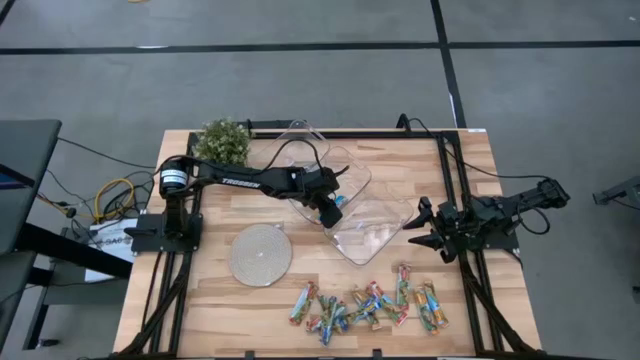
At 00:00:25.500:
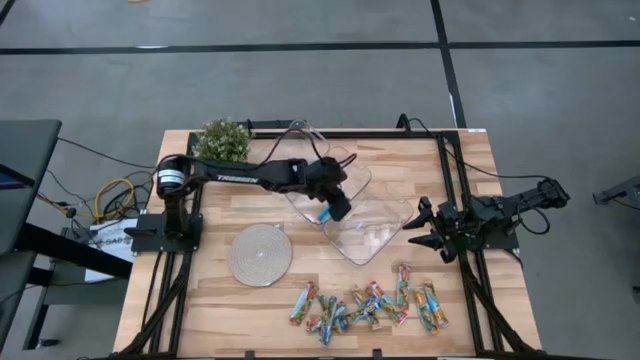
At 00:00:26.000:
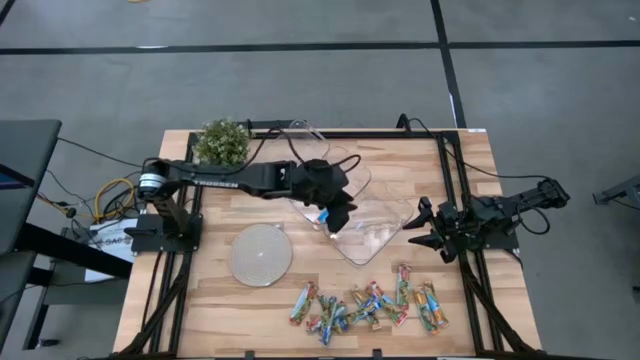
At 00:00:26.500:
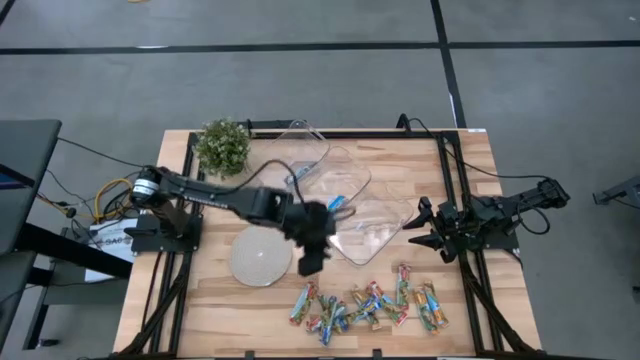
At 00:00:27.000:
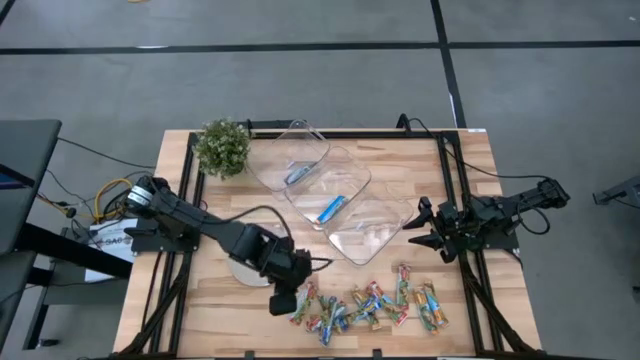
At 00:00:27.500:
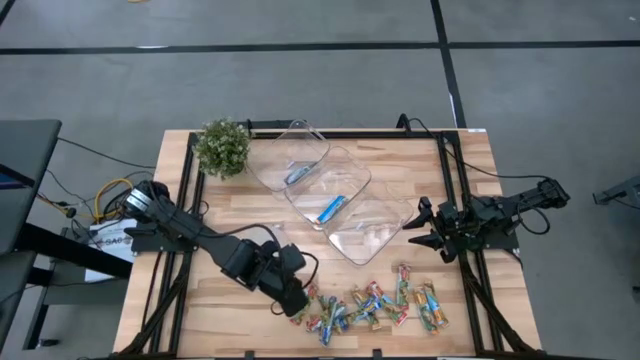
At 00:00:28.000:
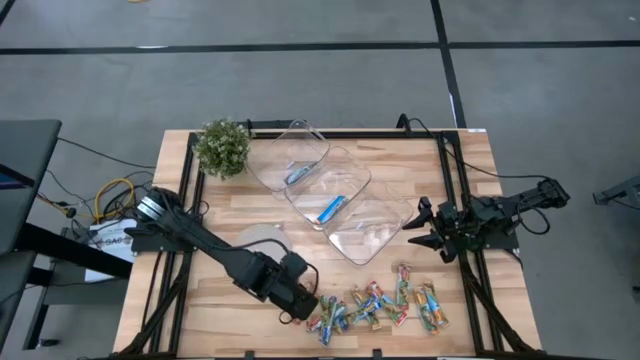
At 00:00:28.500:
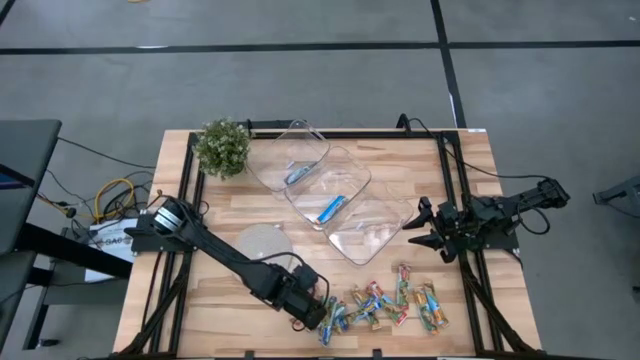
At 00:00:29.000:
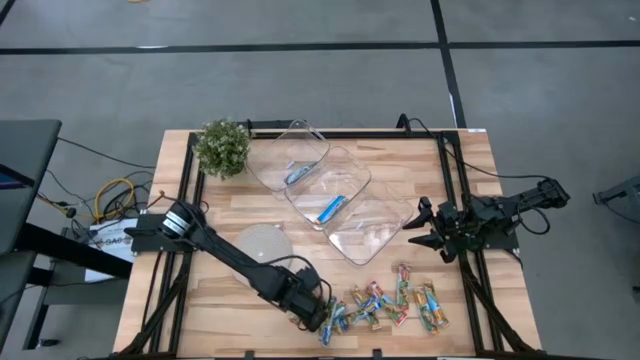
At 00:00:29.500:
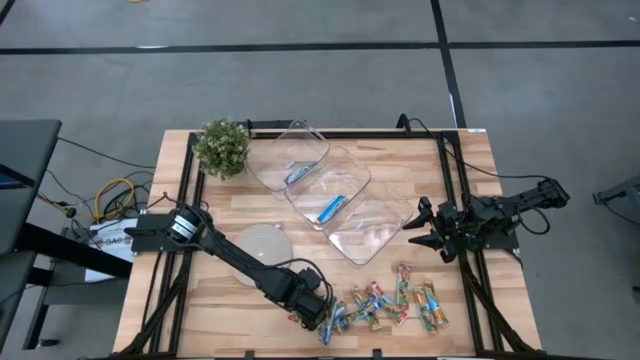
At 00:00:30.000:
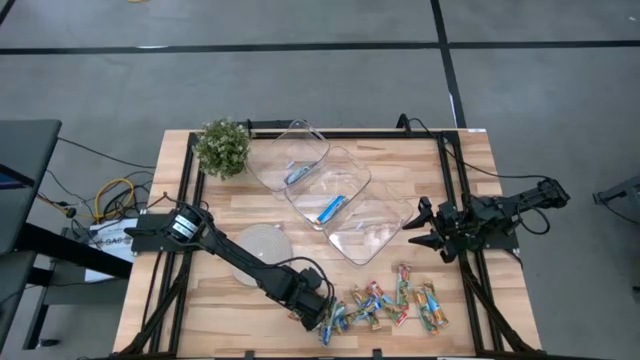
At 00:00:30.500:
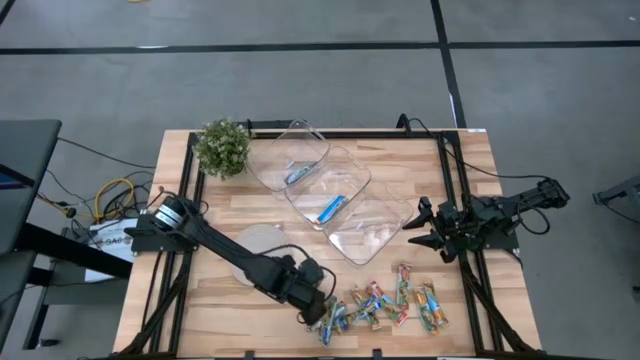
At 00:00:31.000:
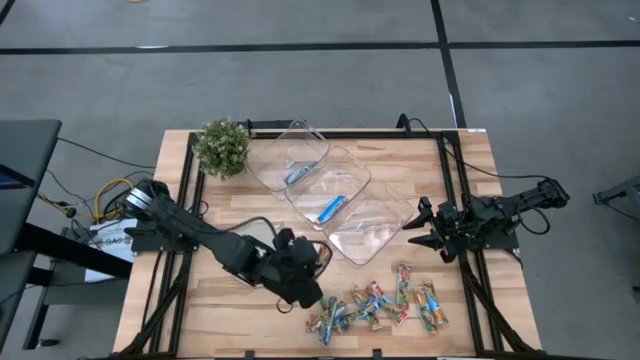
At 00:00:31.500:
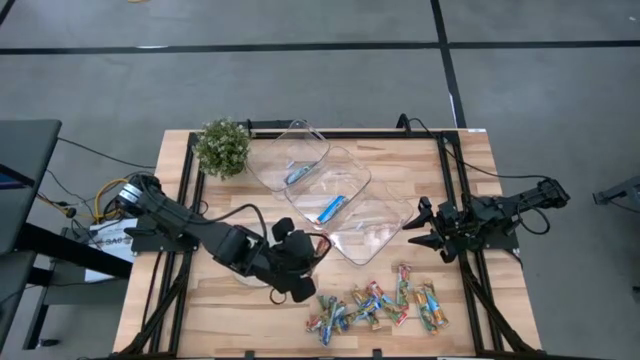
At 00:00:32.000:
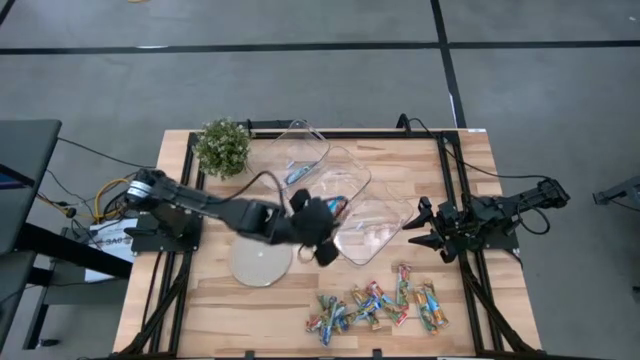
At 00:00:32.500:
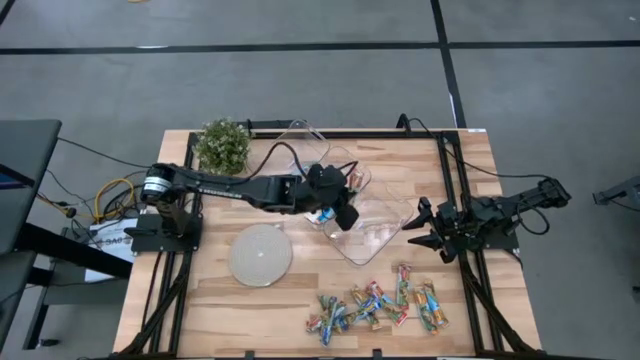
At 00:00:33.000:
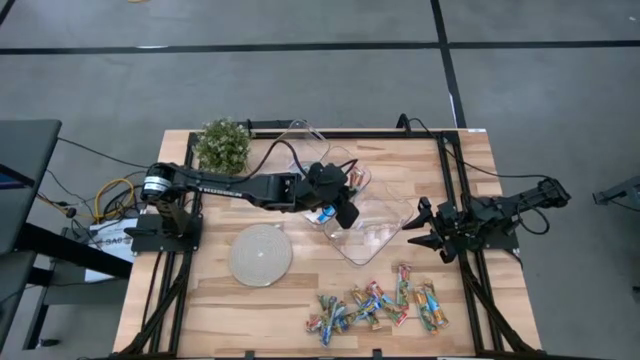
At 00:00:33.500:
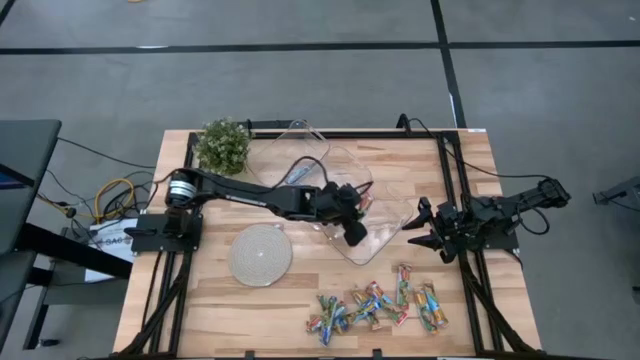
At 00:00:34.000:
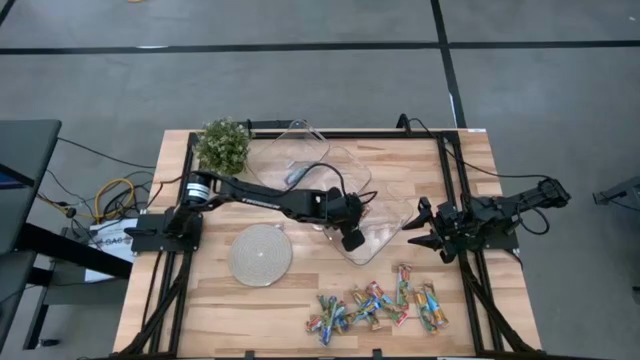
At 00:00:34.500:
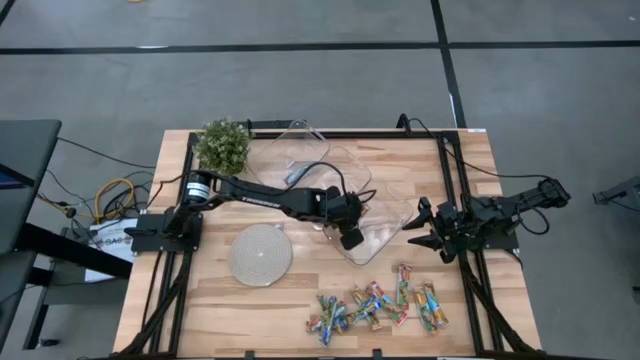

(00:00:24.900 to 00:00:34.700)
Task: Pick and place Granola Bars by type
Put the red granola bar into the bottom transparent bin

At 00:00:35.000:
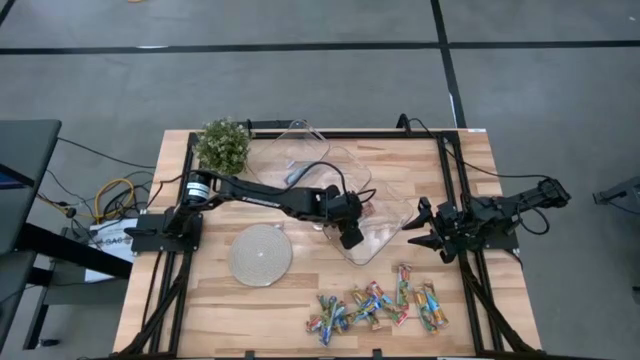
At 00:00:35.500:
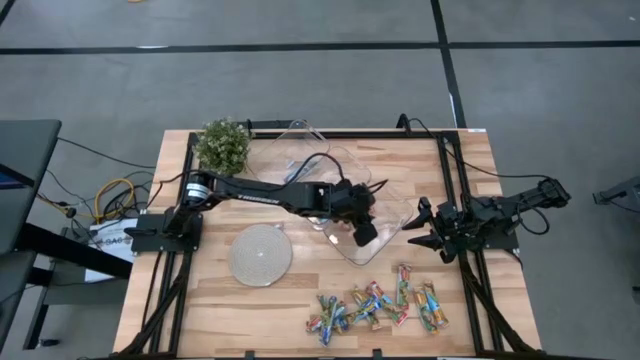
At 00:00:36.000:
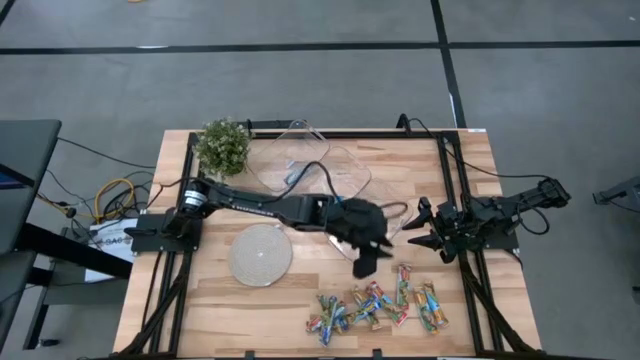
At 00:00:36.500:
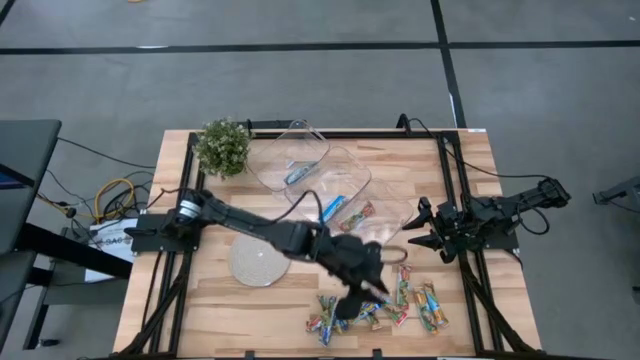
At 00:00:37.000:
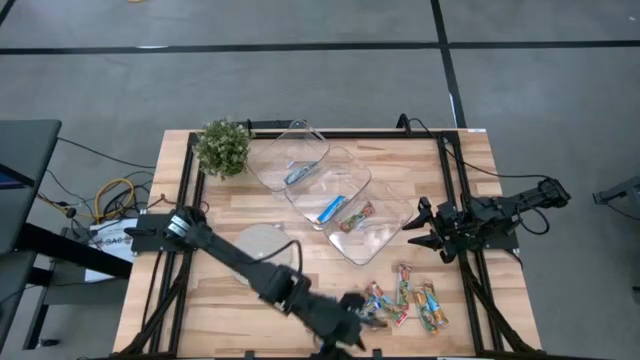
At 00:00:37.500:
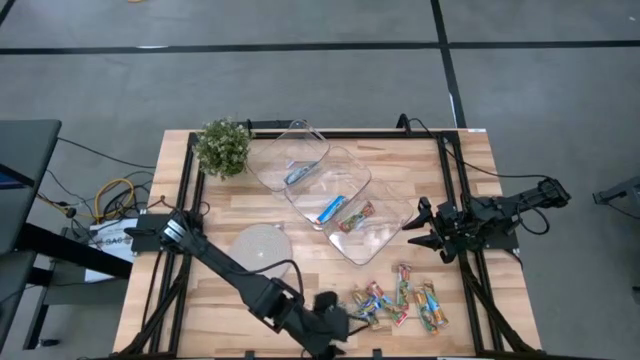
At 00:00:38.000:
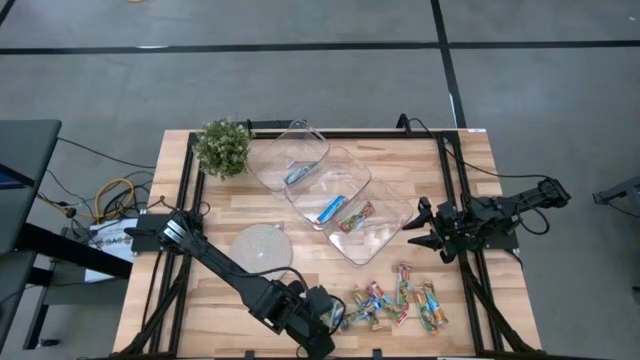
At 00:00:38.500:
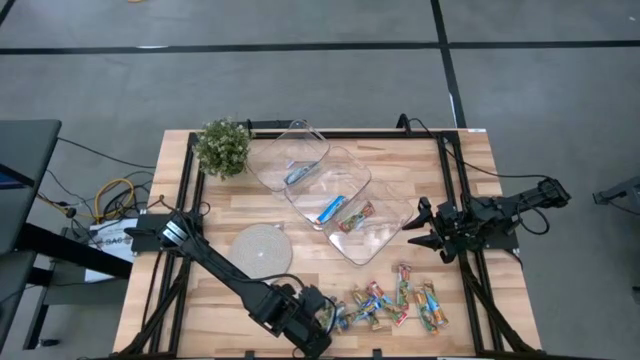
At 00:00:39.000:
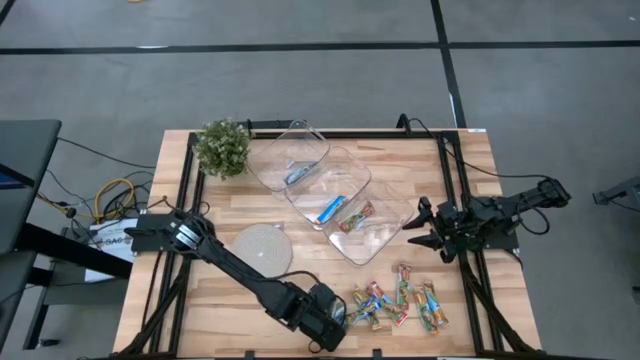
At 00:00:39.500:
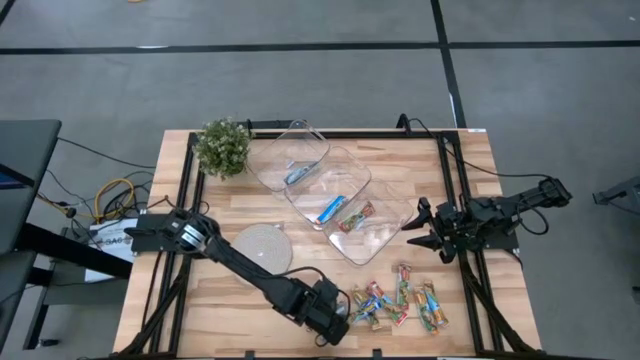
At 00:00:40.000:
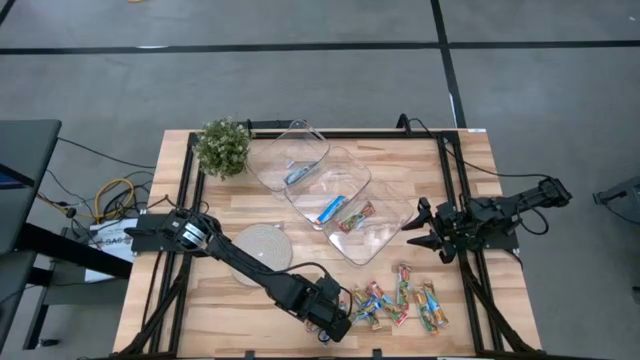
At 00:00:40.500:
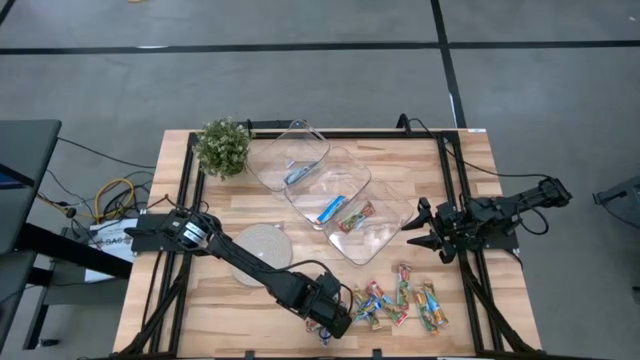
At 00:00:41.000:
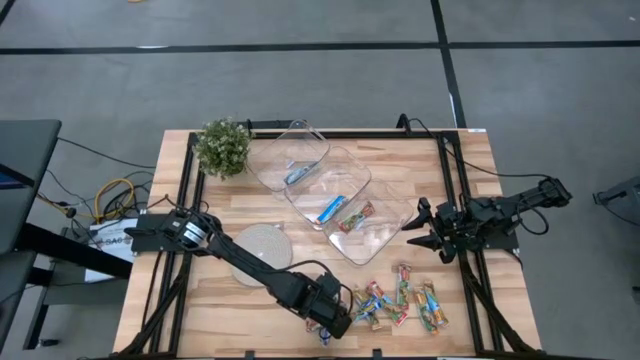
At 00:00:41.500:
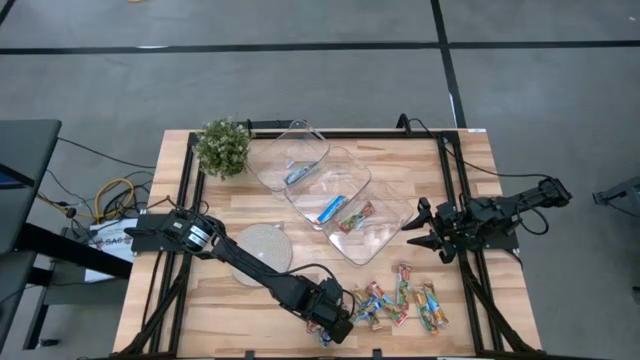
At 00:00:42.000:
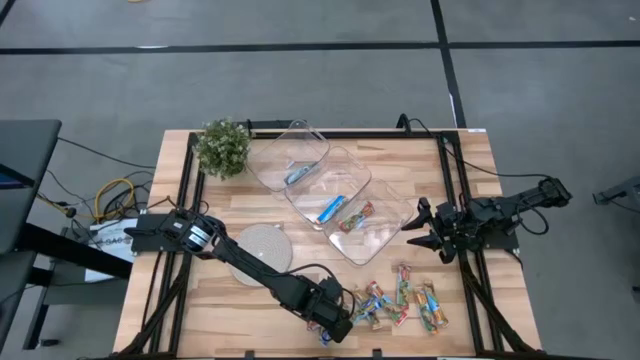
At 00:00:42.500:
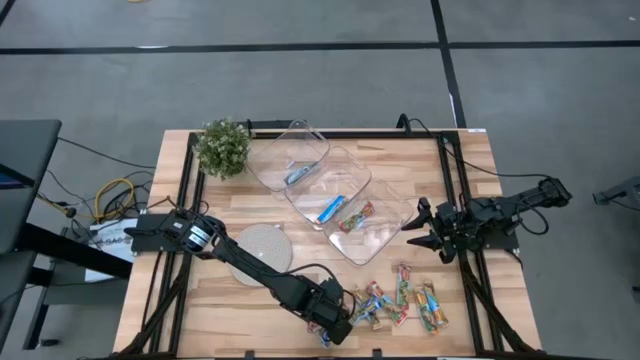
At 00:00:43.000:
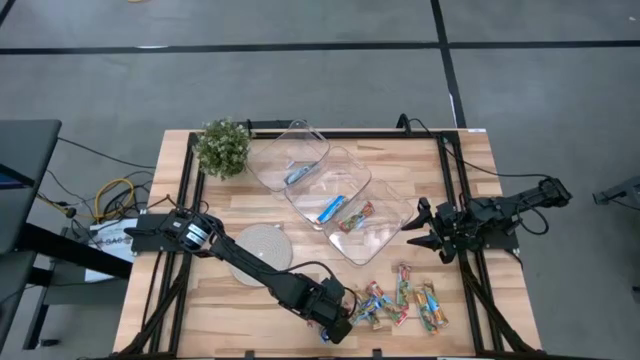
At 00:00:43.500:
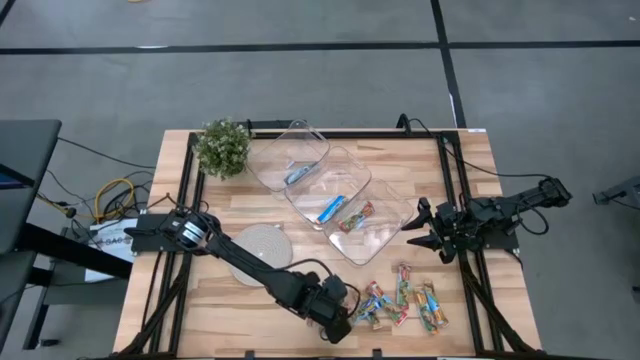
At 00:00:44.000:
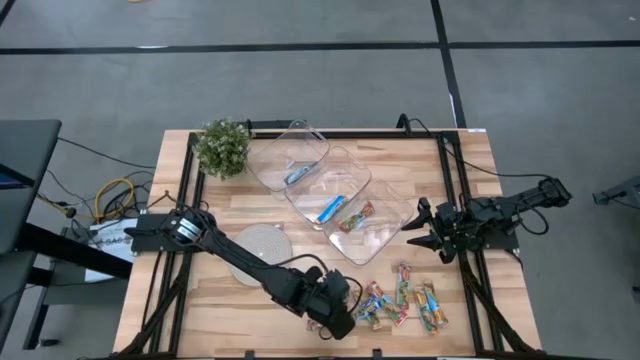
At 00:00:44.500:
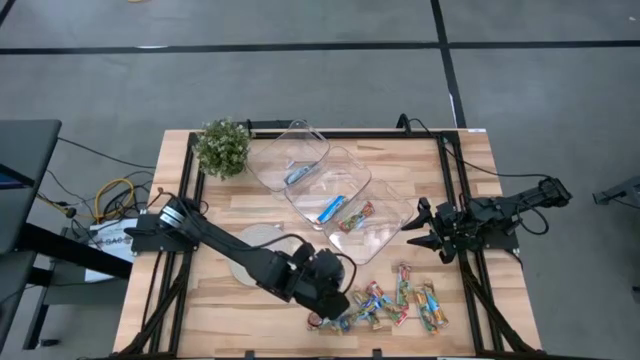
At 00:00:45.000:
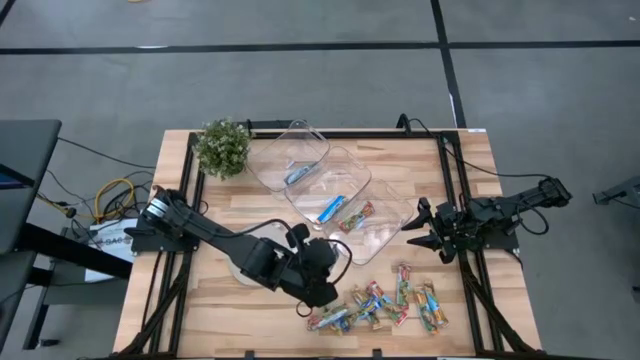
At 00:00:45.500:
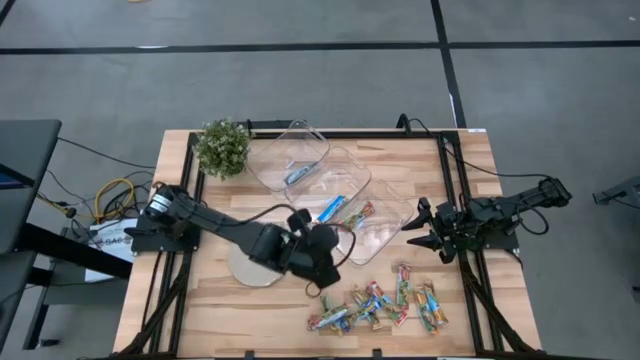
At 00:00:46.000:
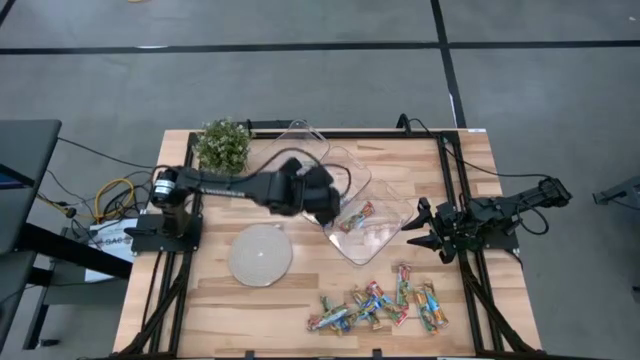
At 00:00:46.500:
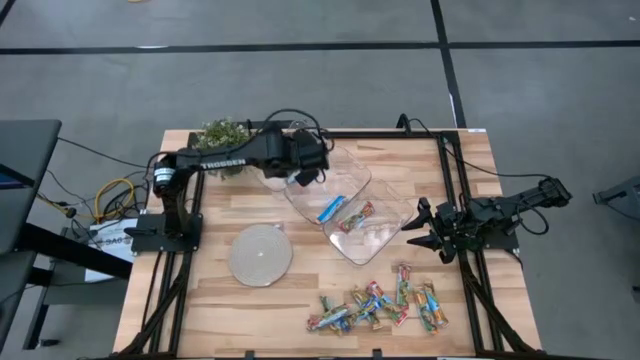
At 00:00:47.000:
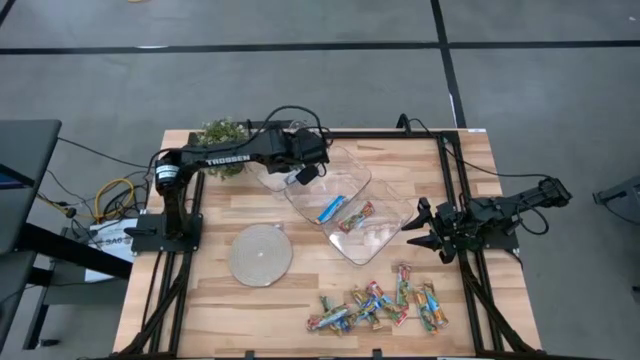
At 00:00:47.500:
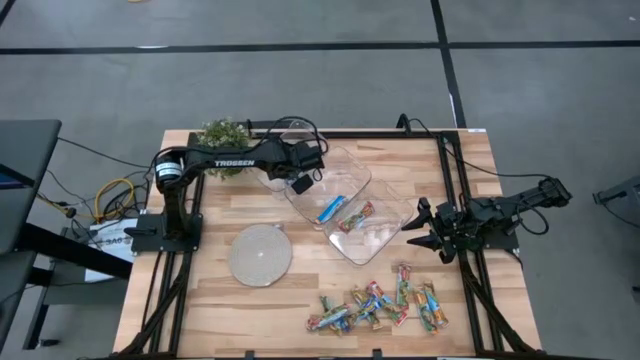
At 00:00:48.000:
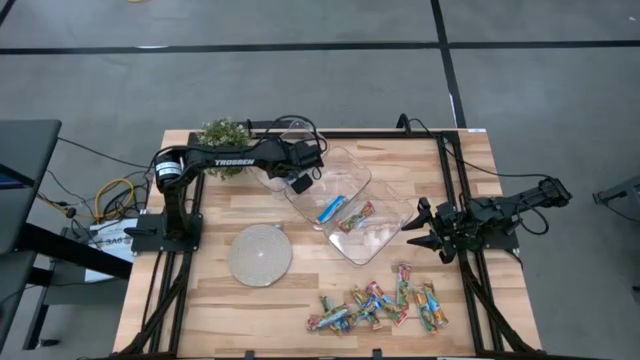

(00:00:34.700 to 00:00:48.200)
Put the blue granola bar into the top transparent bin
